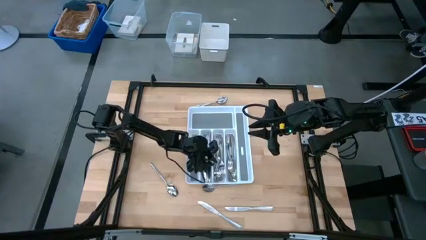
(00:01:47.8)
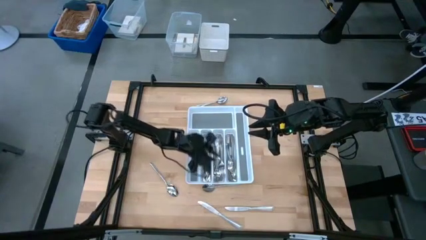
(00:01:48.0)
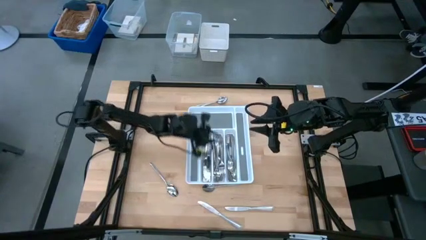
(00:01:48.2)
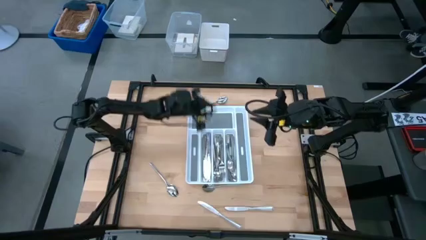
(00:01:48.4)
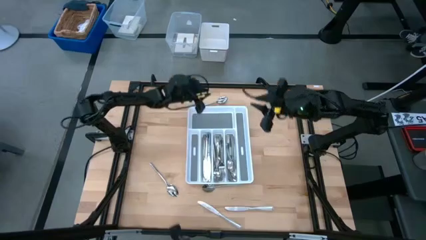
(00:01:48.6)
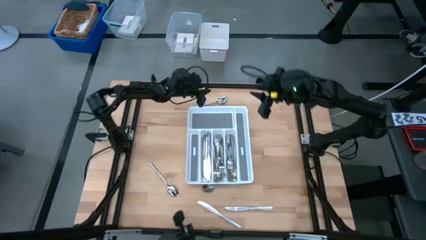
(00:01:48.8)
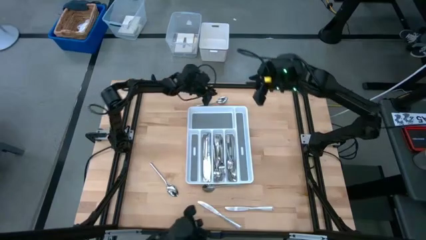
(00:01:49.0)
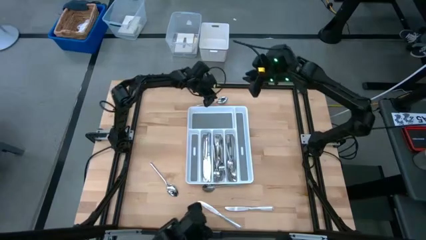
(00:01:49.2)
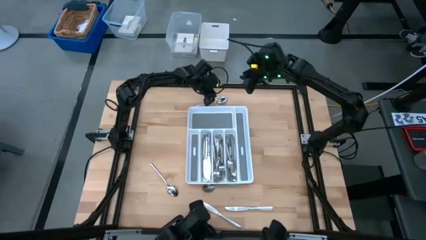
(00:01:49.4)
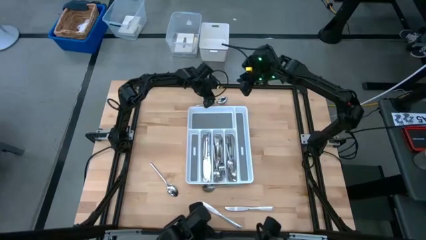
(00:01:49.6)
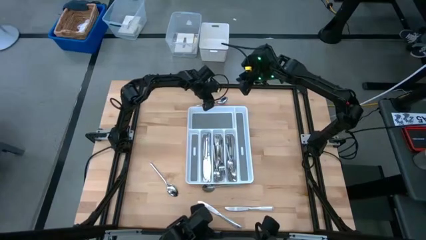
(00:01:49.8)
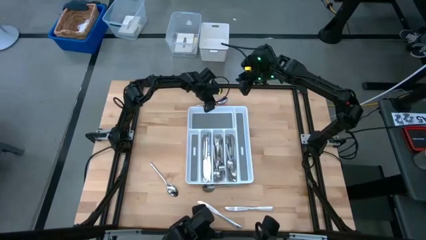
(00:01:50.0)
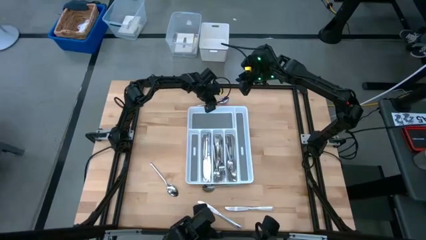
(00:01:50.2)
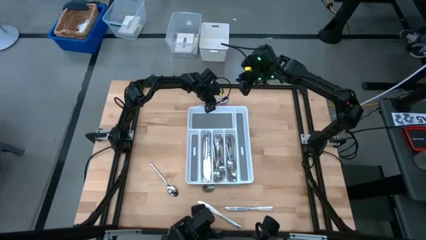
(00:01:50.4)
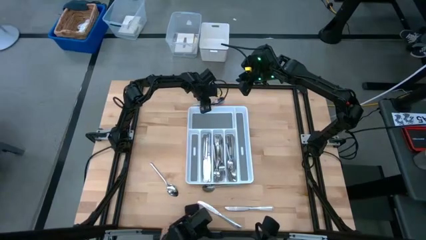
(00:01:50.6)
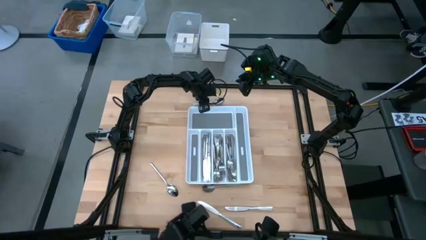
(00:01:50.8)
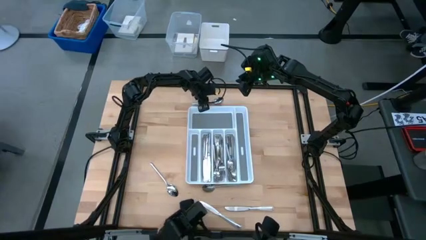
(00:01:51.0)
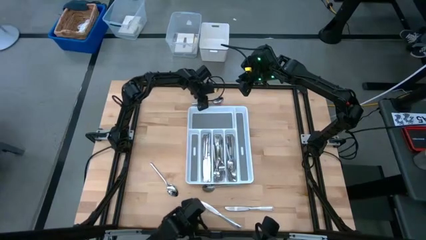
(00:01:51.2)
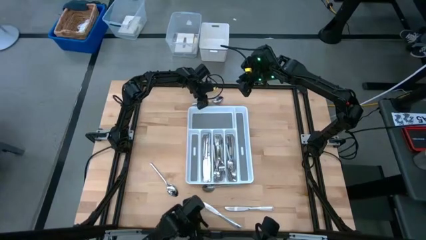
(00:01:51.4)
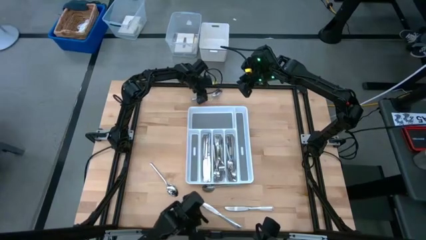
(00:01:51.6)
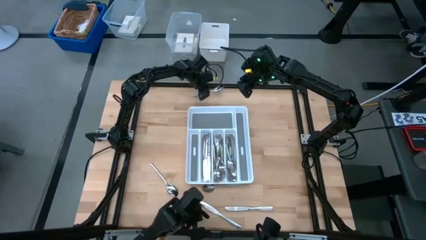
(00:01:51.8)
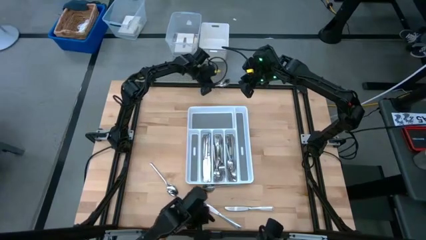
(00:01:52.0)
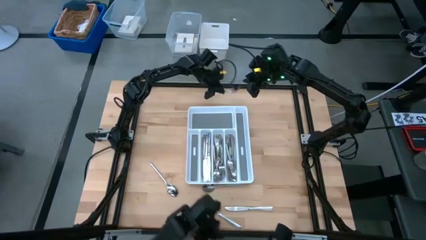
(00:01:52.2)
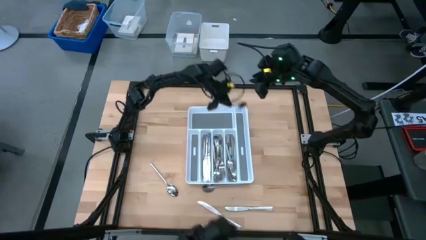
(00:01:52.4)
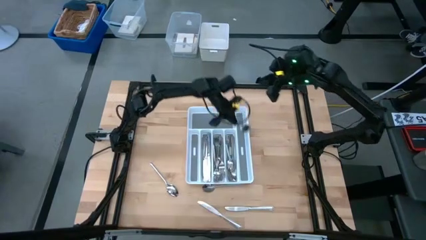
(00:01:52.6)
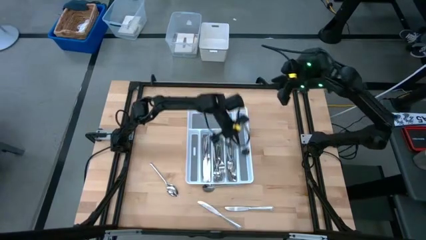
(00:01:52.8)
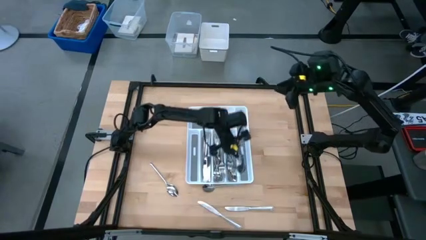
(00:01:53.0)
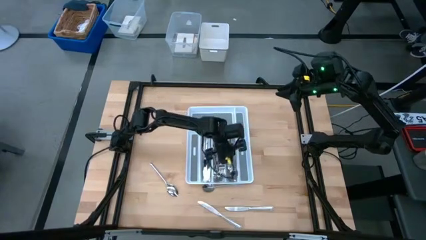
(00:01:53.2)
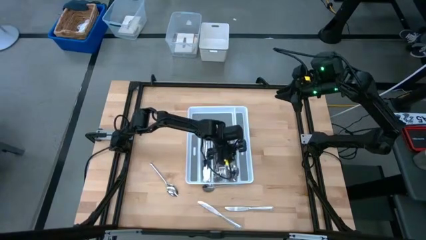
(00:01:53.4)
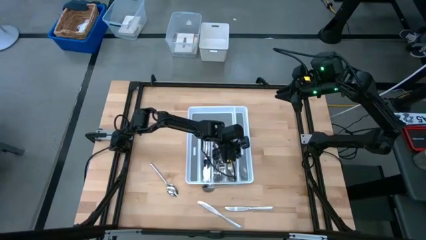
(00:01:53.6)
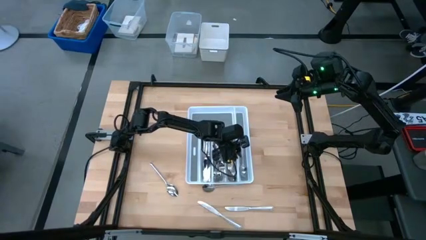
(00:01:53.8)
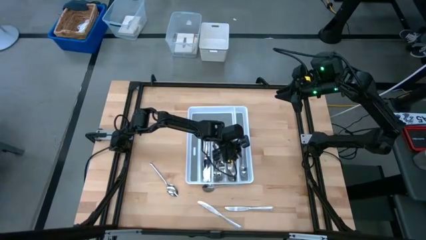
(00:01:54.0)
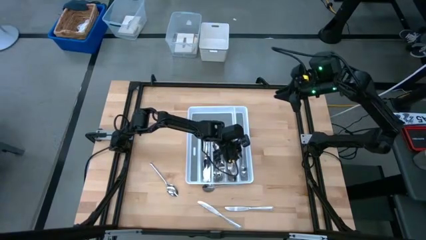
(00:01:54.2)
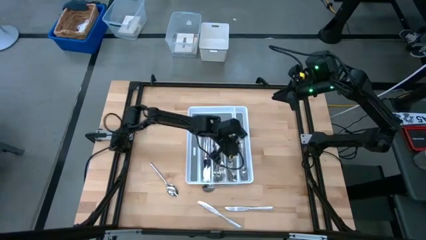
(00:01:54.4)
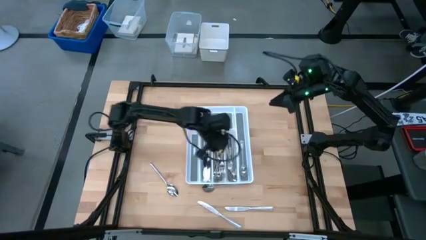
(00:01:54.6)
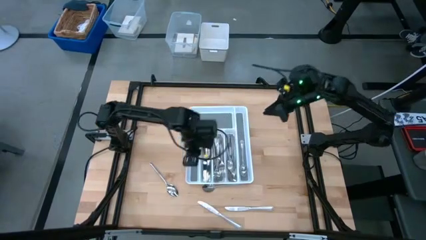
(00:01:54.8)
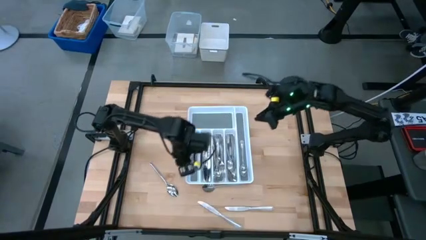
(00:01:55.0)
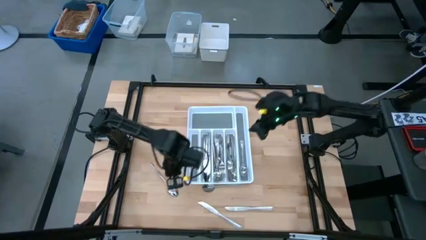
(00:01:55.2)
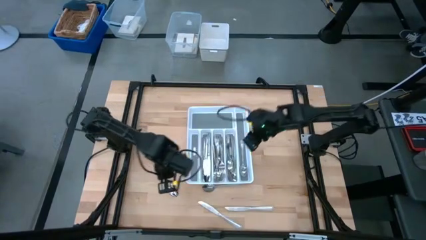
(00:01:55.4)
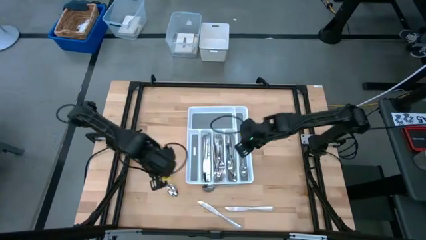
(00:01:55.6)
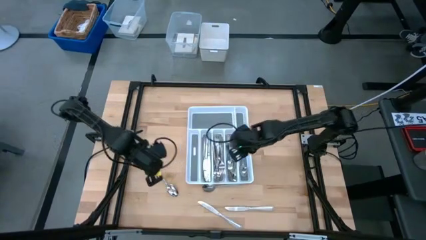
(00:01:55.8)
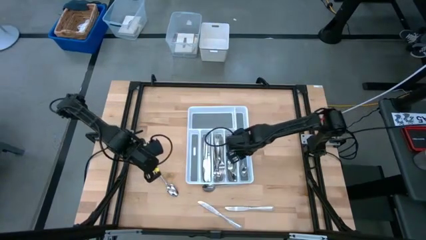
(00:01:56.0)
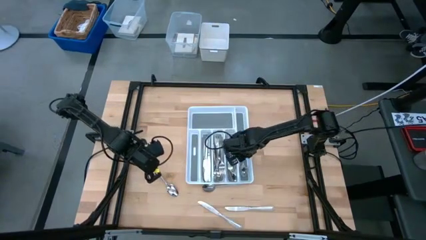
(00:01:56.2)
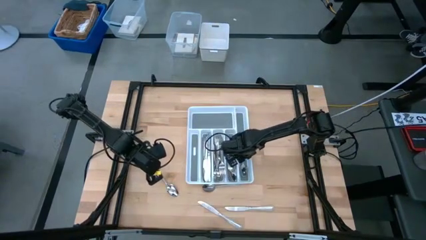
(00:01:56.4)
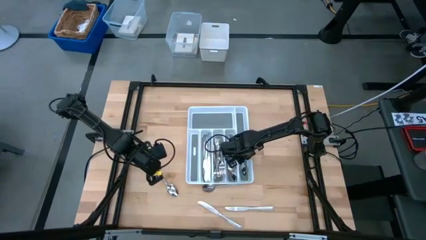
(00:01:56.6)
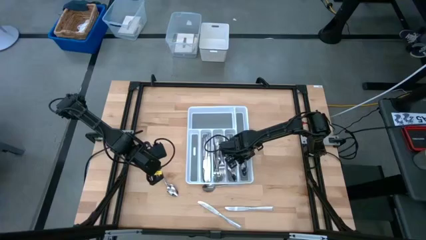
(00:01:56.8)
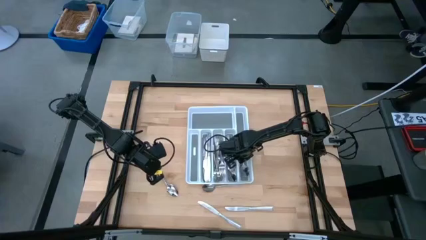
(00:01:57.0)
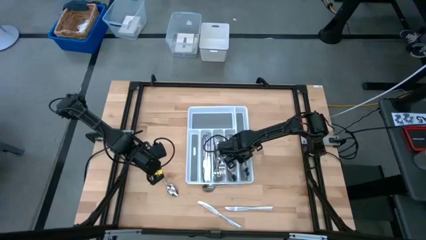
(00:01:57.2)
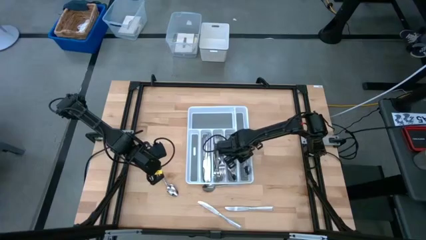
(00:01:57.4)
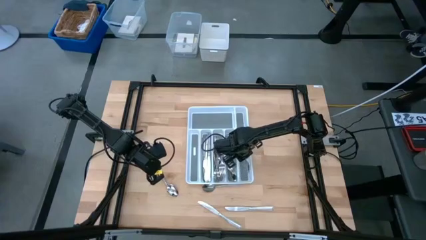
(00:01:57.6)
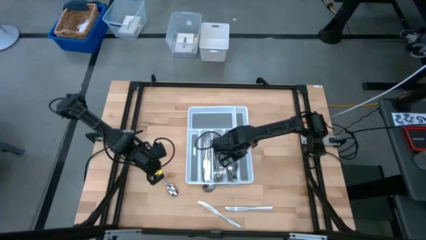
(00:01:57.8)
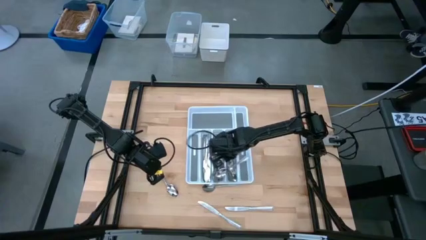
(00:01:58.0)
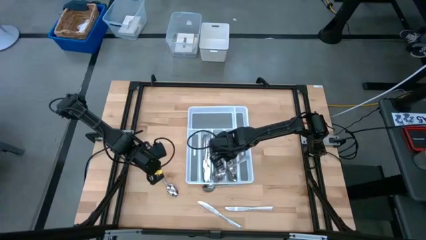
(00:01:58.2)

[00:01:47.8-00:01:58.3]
Task: Sort silverware
Put the silver spoon into the white cutlery tray

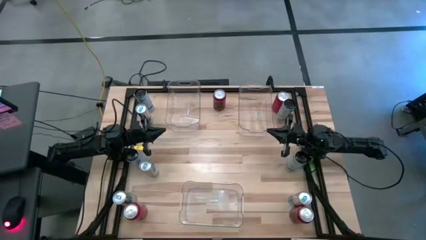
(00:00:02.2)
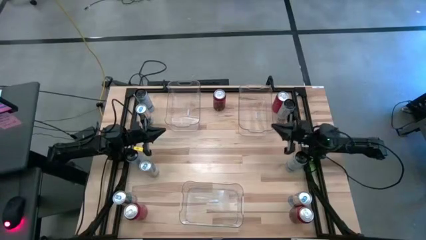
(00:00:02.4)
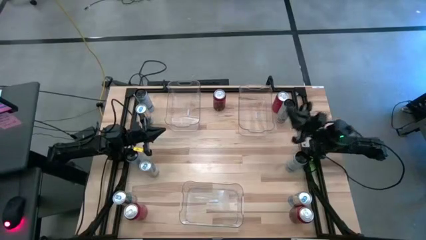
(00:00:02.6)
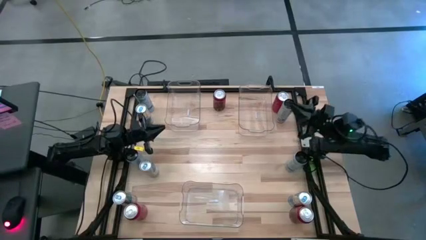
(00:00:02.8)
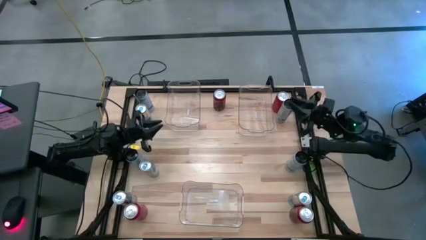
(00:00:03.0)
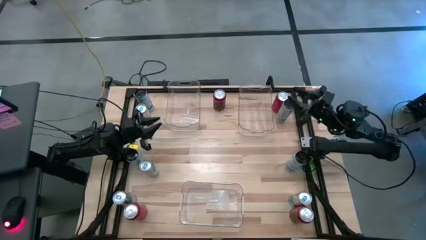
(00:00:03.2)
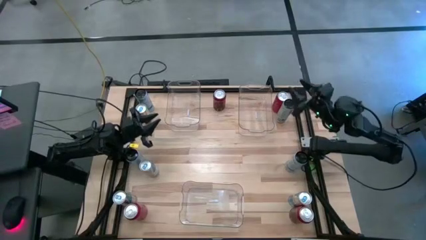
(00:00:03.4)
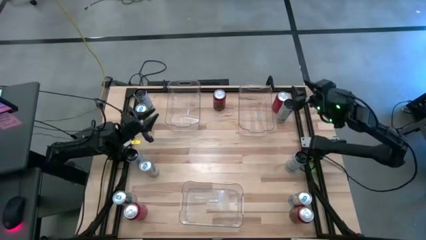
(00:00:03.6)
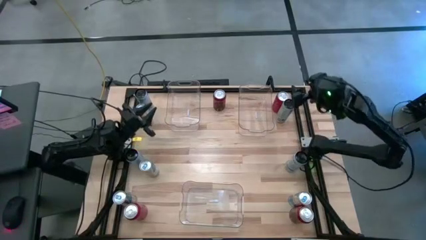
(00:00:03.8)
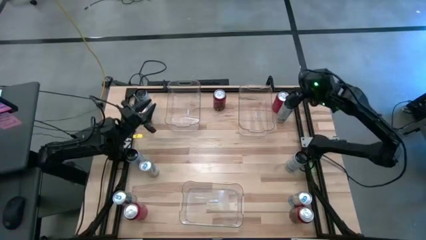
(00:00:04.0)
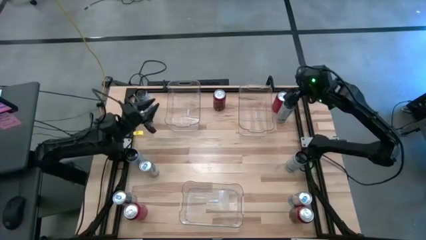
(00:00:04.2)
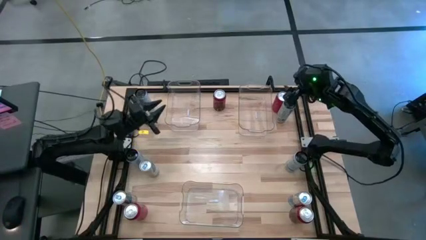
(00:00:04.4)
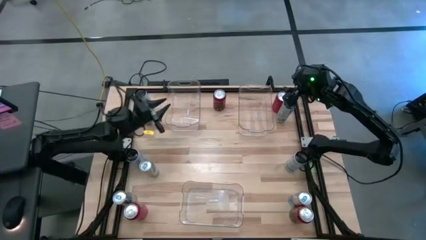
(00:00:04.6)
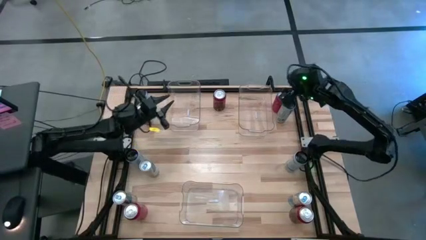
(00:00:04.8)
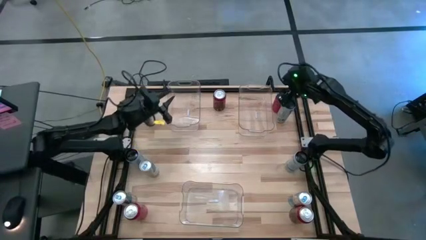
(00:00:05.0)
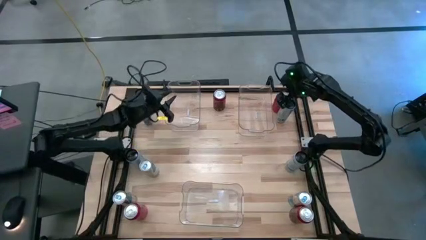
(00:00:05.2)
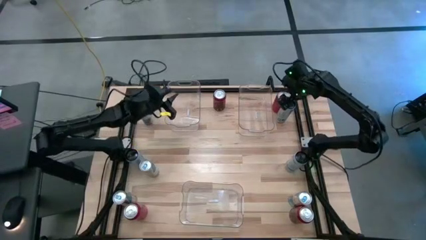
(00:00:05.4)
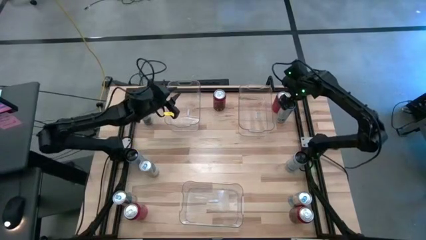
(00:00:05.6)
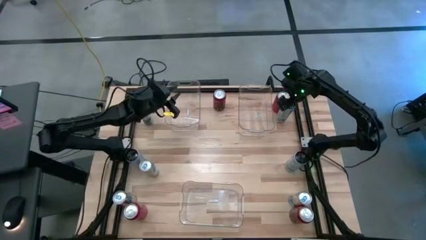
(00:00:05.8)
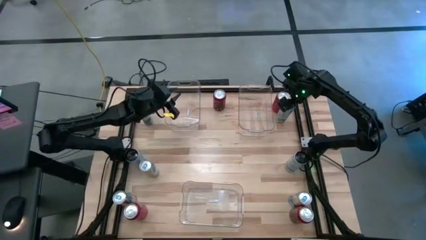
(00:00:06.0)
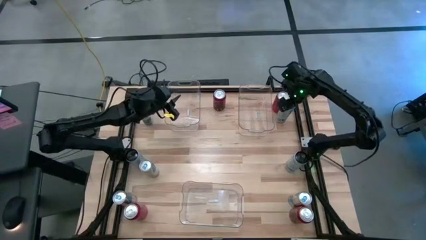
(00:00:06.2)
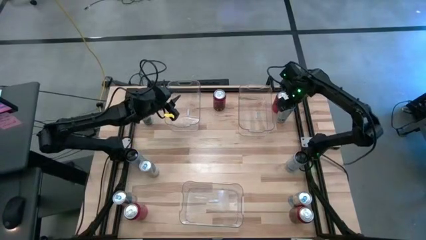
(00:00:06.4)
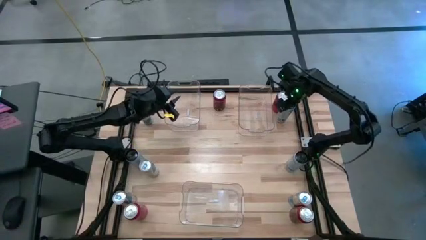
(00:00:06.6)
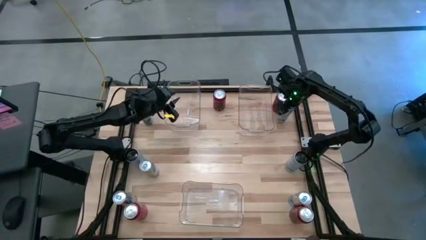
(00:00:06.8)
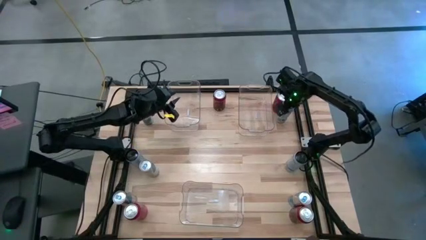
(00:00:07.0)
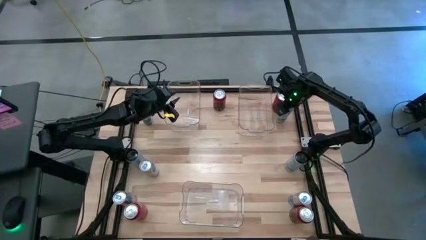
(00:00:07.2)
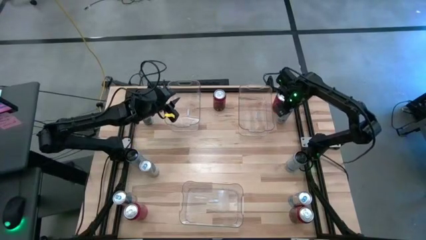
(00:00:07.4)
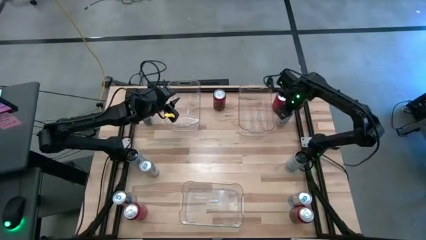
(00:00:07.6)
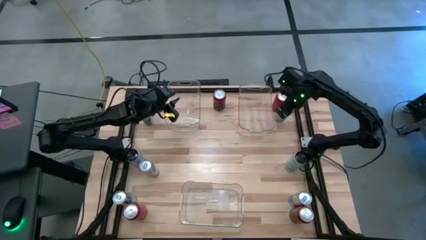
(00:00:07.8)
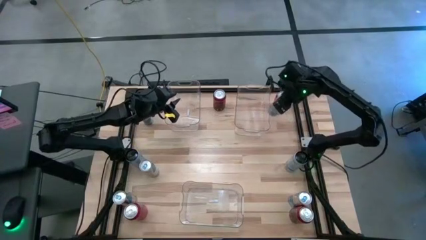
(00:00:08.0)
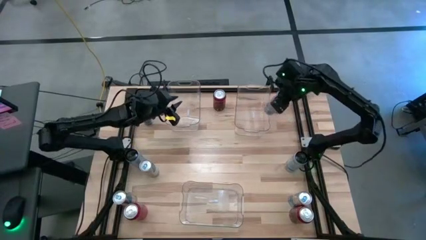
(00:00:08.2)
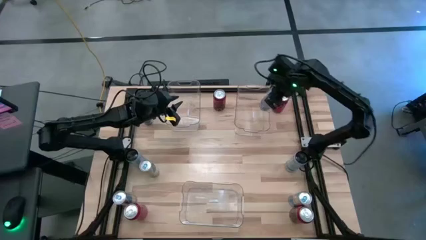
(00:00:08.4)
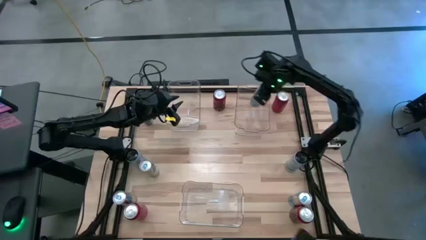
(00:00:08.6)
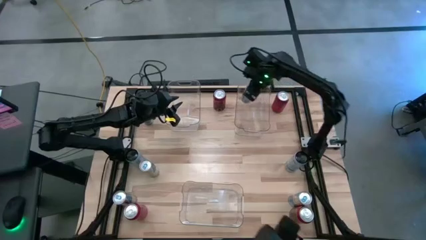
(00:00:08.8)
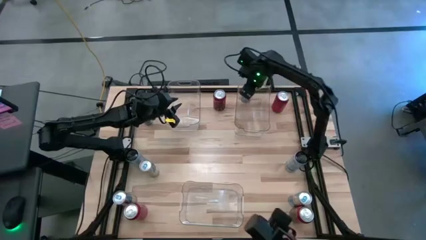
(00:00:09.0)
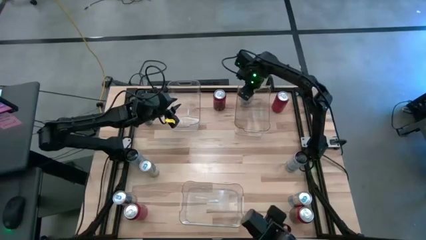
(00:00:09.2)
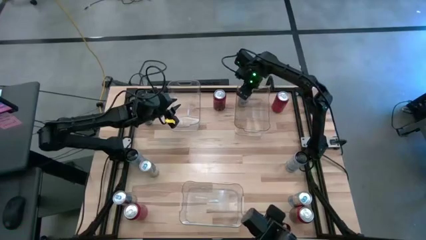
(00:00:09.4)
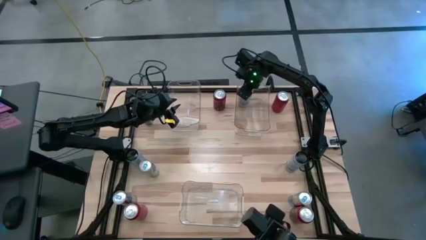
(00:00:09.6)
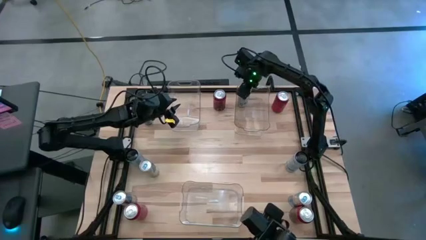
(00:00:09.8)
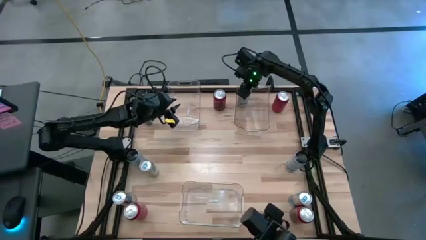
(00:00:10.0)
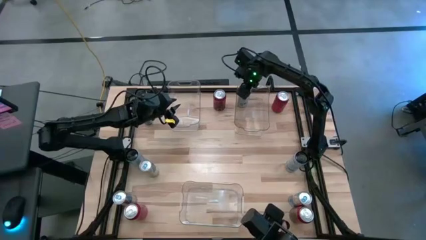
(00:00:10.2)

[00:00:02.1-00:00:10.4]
Task: Sort soda cans
Put the top right white-blue soda can into the top right transparent bin
